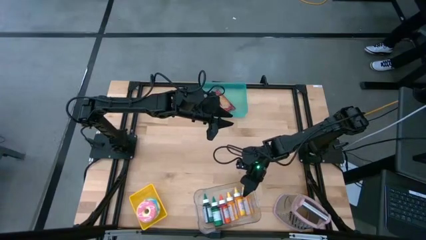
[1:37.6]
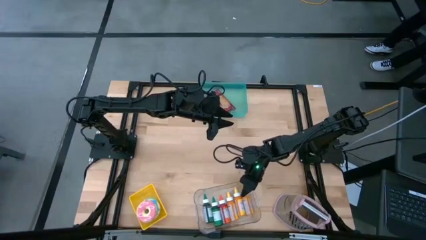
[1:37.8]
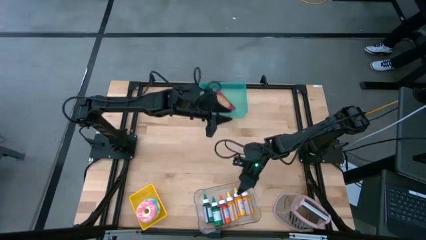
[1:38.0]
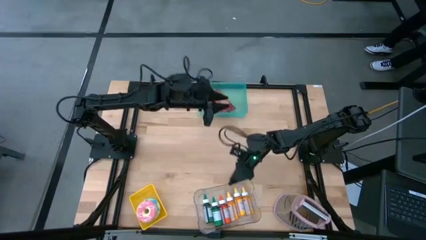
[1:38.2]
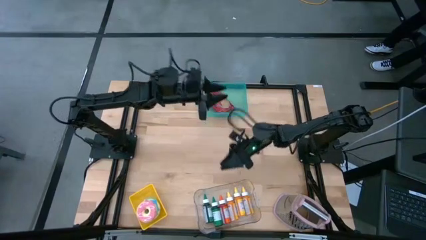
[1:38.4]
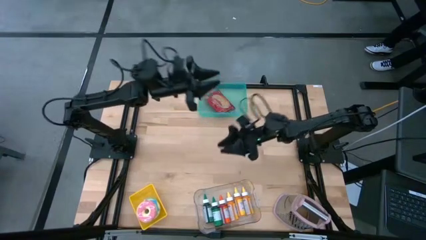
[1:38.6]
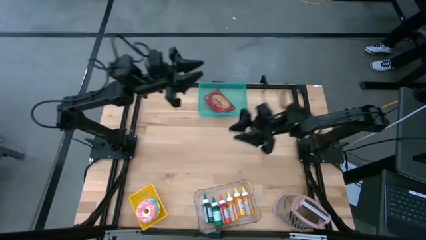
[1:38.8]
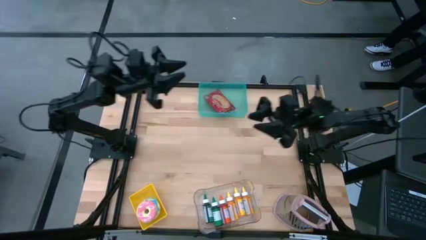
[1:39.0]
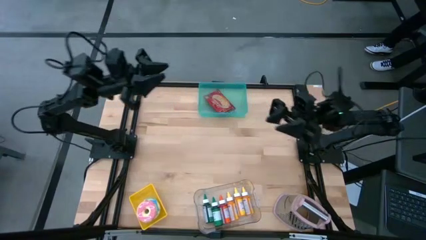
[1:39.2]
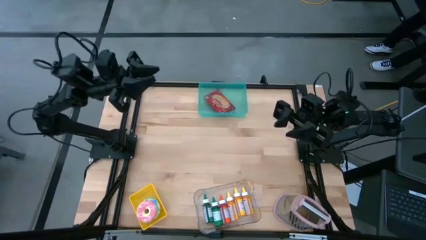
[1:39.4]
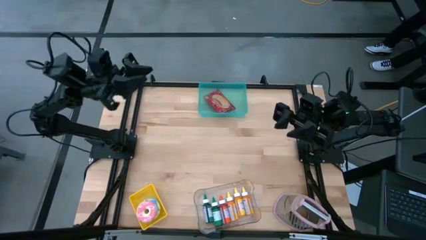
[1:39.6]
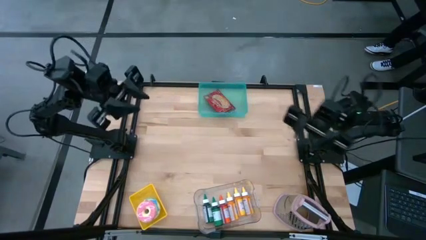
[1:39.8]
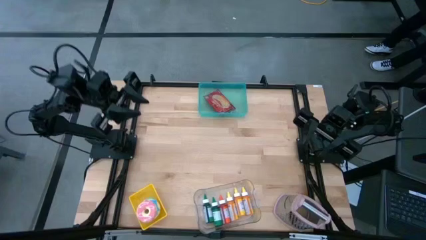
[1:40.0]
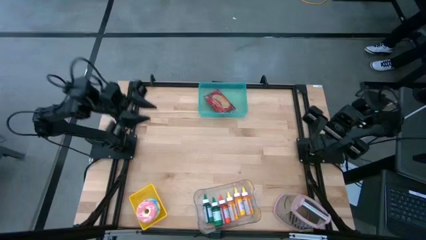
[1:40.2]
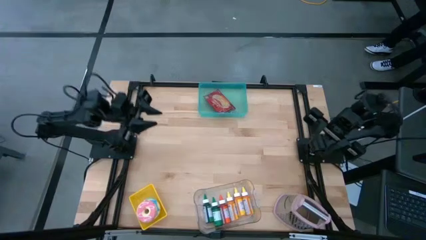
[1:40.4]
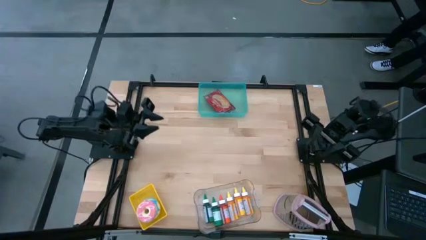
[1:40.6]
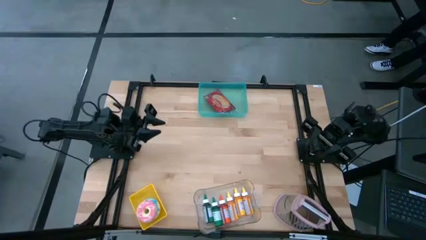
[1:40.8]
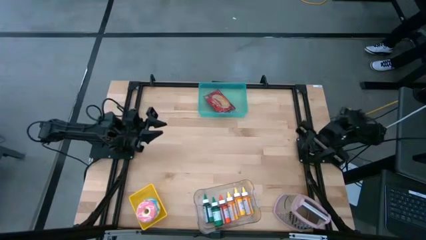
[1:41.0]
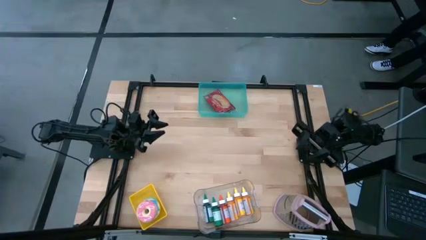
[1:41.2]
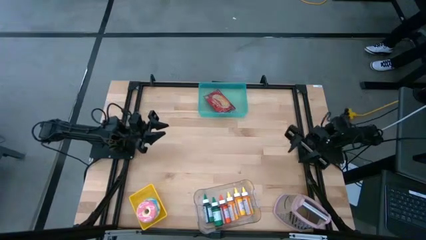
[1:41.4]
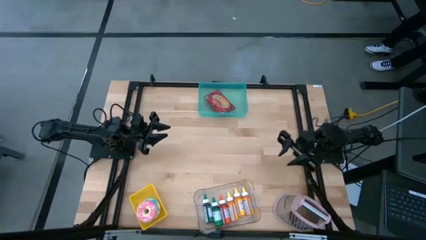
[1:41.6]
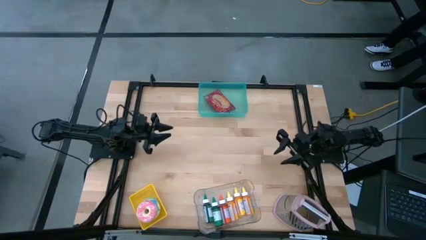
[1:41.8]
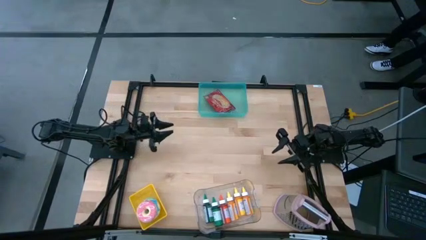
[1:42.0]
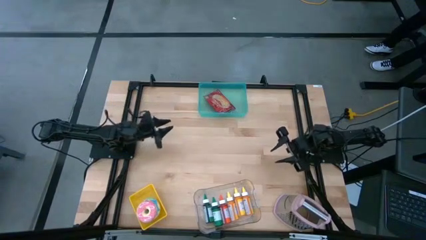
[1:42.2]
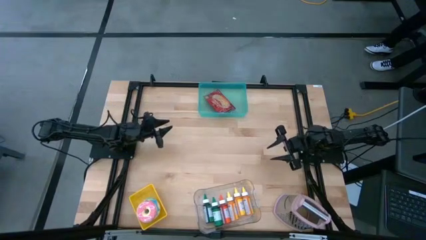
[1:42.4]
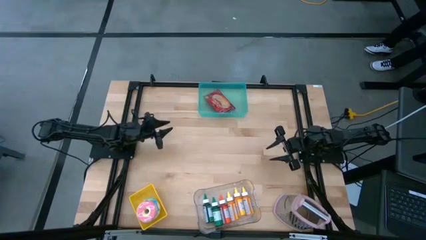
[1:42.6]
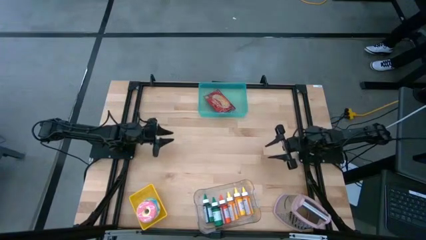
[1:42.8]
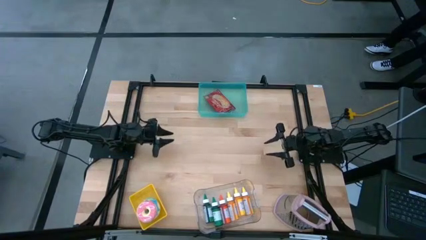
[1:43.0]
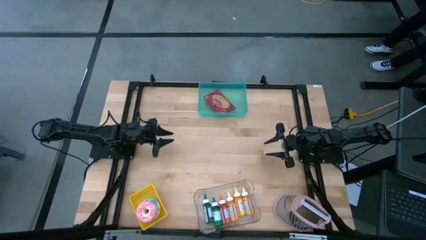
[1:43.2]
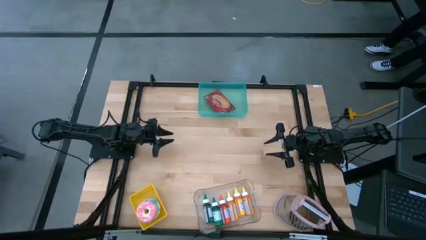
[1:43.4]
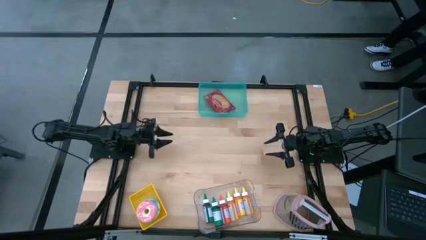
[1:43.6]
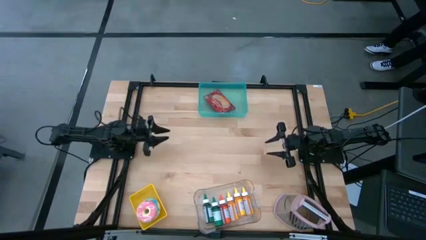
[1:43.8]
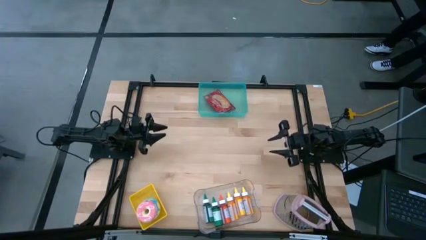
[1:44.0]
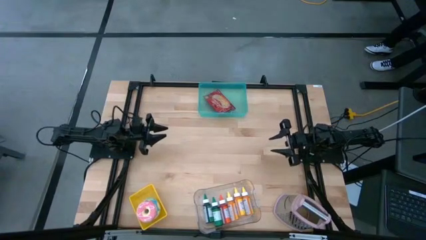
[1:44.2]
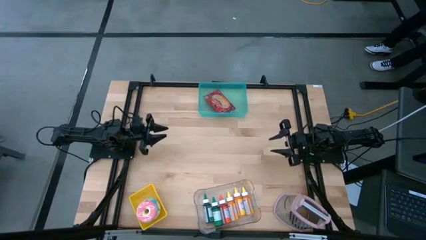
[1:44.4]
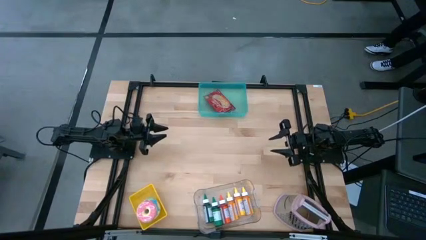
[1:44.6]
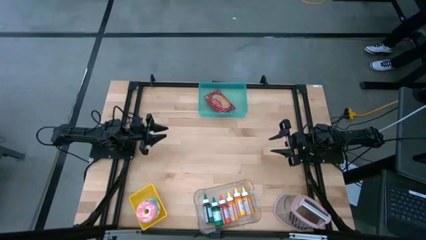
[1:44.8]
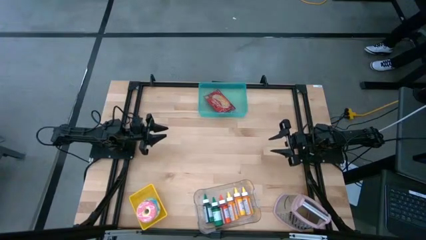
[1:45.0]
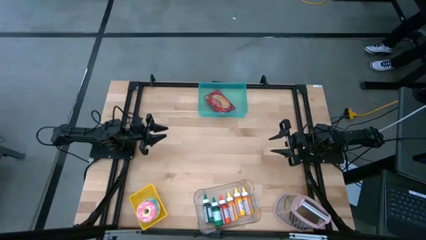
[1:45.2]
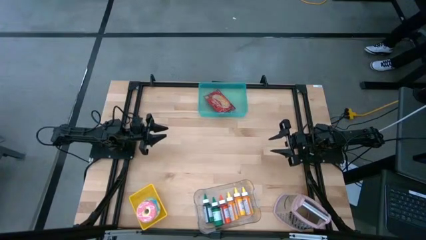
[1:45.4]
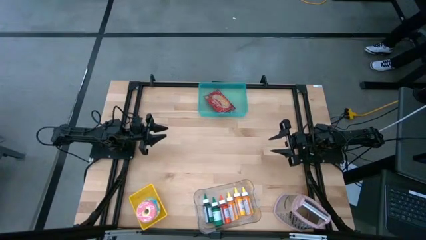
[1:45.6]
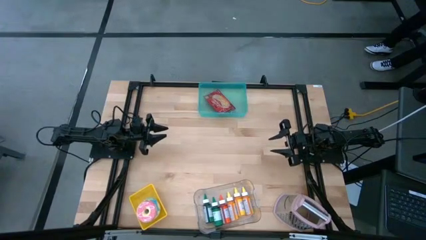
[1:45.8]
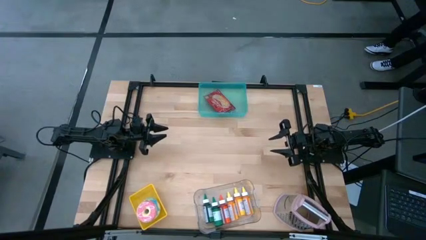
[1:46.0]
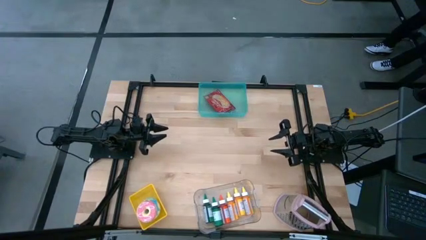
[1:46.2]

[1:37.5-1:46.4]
Return to Home Position
